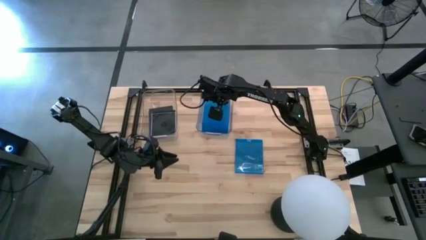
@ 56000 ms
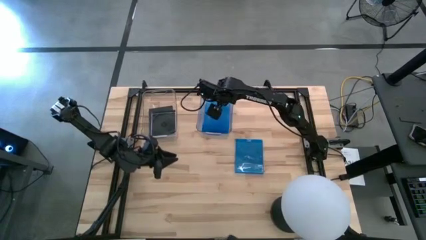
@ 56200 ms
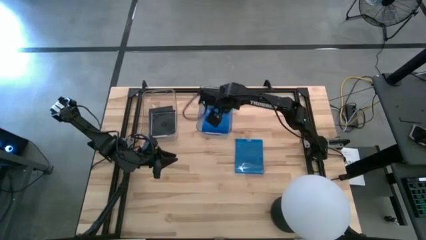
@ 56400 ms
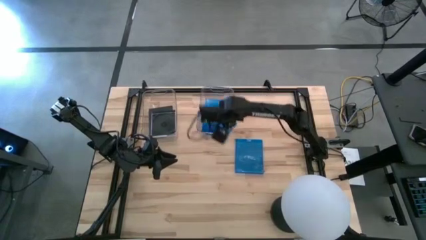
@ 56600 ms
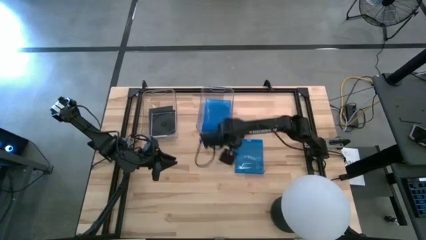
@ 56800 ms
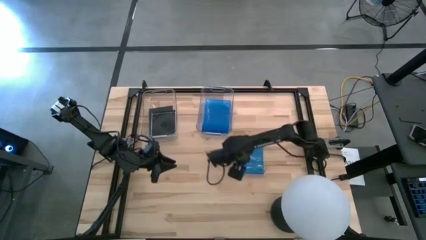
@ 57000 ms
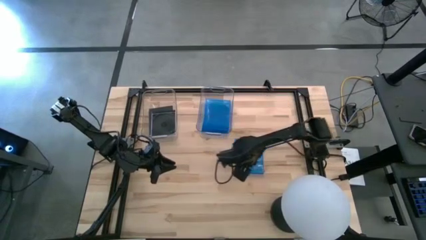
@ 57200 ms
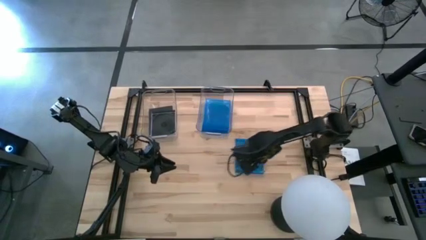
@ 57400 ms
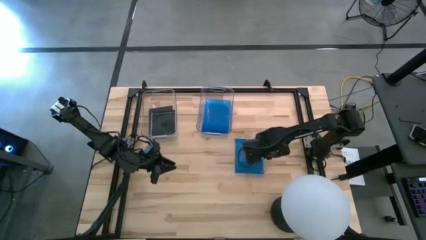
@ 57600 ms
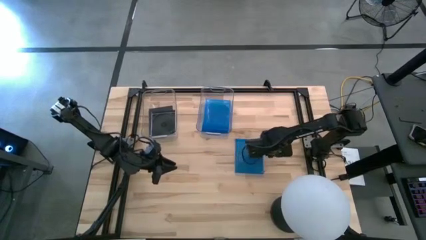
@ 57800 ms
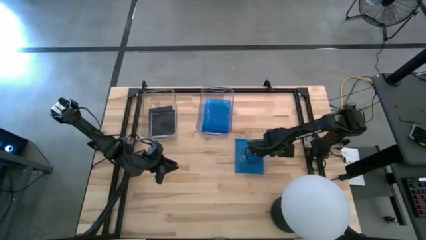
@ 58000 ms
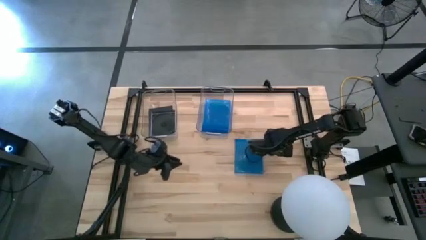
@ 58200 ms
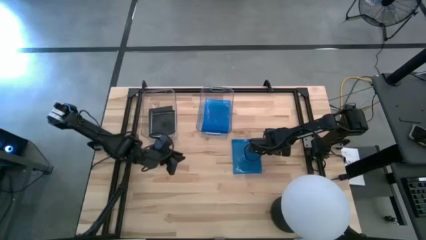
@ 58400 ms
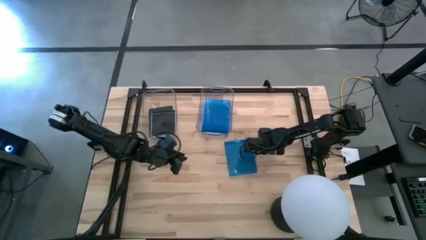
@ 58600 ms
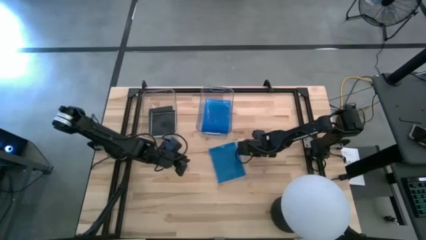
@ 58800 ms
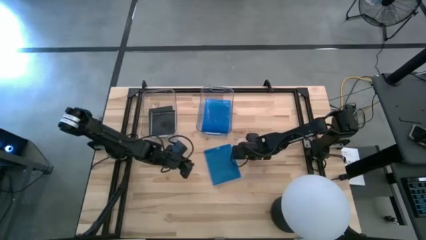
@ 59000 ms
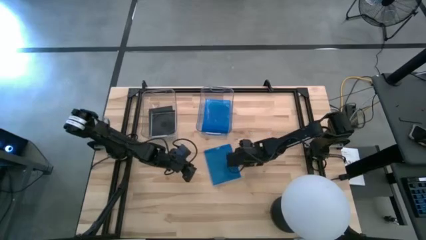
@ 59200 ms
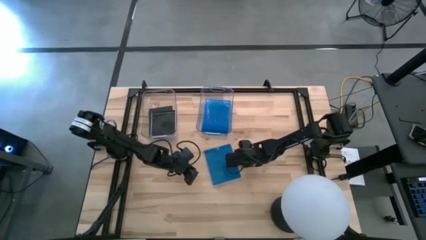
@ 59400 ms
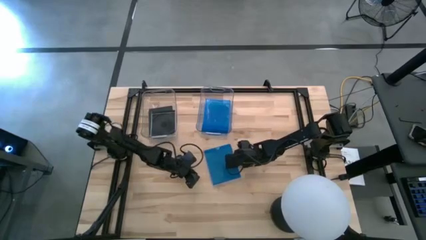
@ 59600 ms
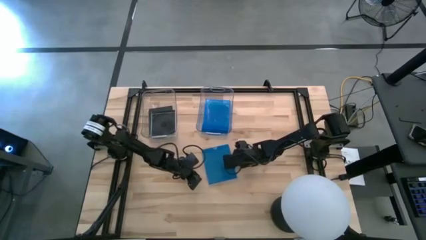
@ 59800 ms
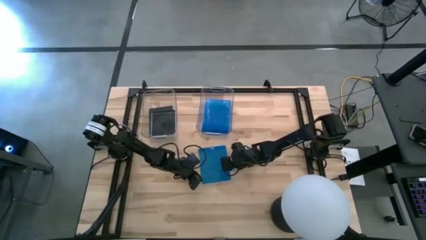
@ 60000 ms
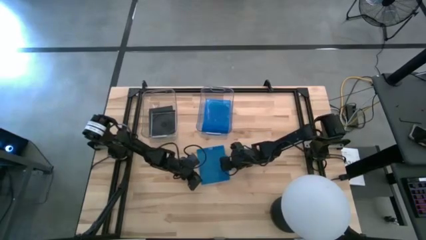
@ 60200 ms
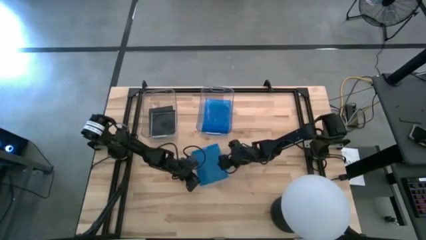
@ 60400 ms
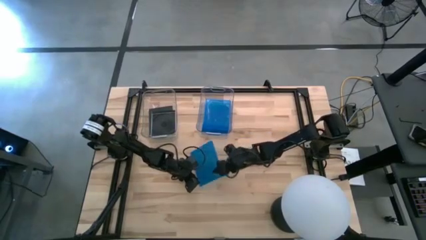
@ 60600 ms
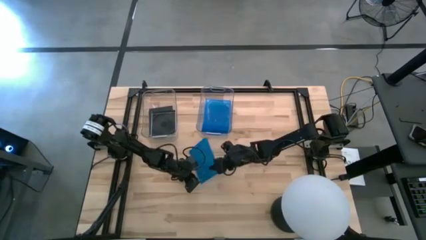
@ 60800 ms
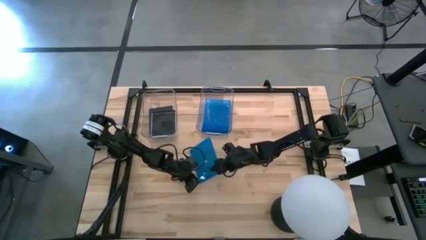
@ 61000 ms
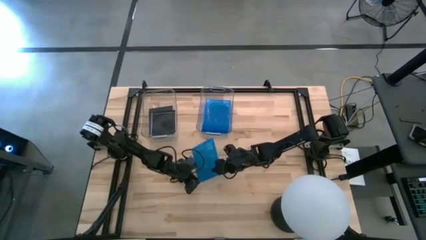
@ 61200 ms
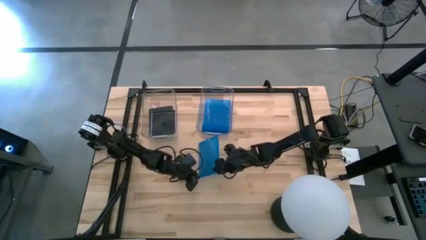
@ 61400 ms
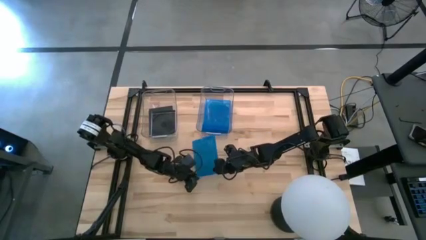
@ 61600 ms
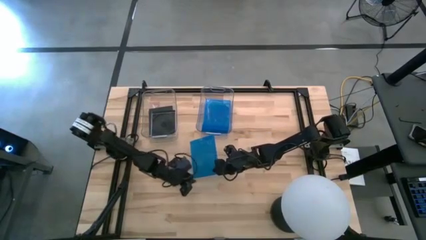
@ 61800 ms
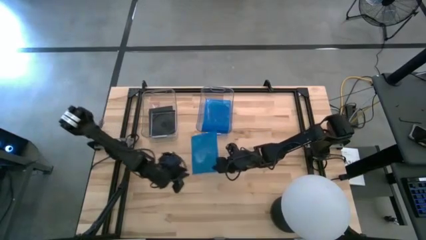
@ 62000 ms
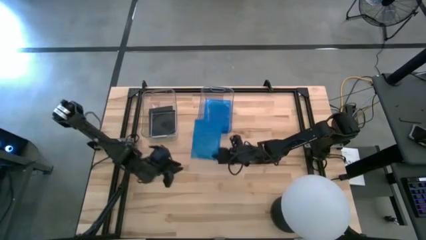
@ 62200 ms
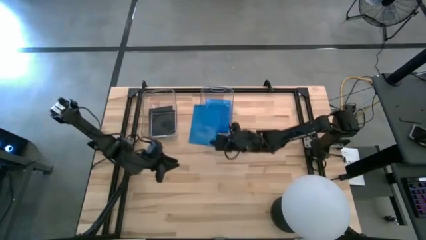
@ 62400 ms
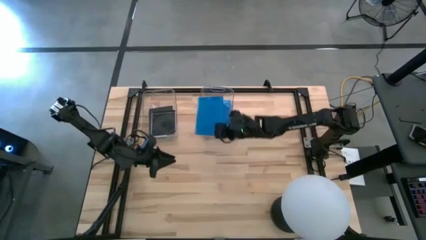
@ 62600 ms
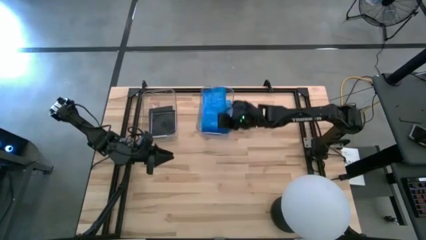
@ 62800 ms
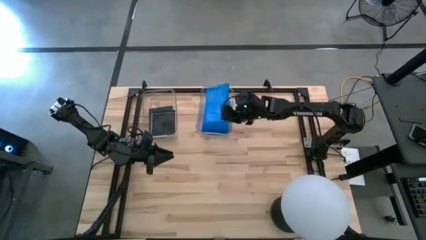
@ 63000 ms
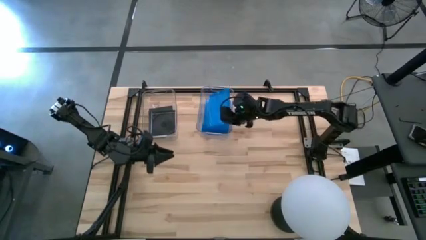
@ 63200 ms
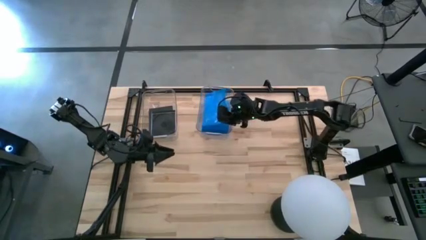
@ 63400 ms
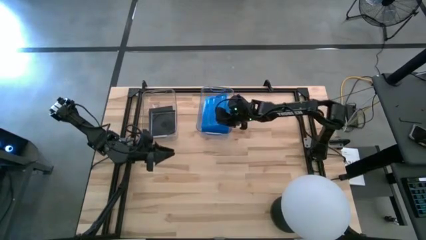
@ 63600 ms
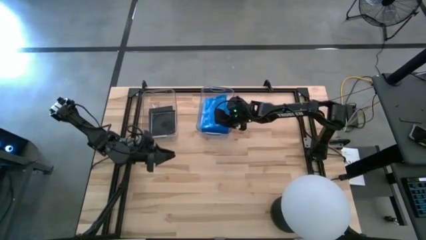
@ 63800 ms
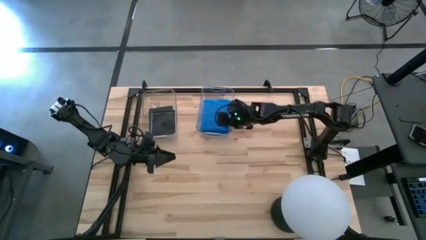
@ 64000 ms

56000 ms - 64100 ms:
Task: Pick & place jewel cases by type
Put the blue CD case into the right transparent bin

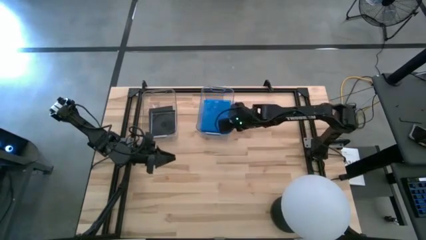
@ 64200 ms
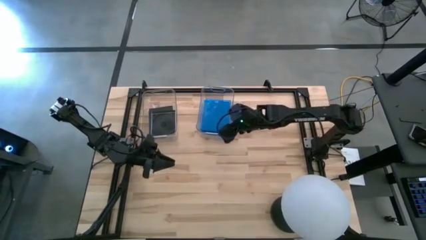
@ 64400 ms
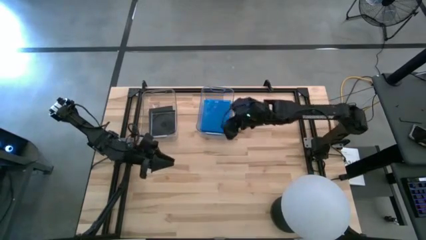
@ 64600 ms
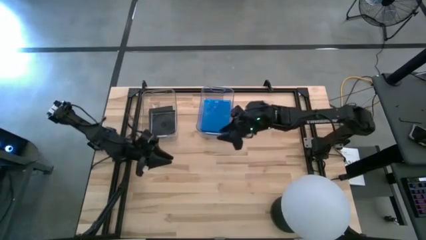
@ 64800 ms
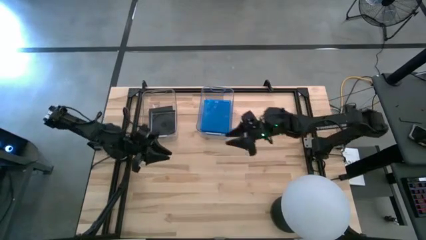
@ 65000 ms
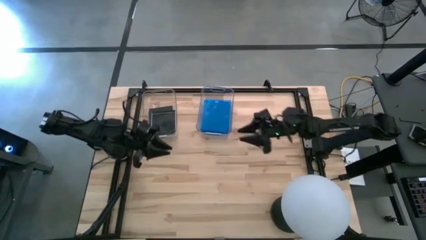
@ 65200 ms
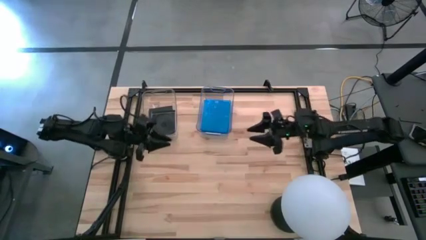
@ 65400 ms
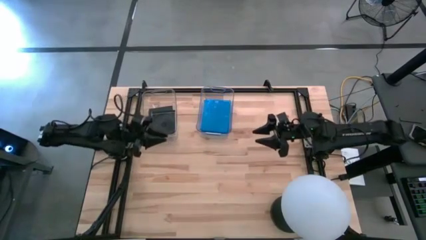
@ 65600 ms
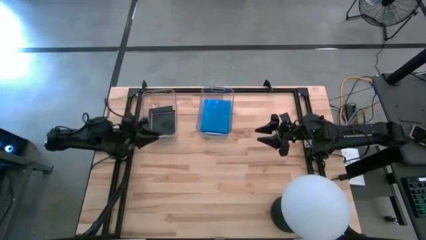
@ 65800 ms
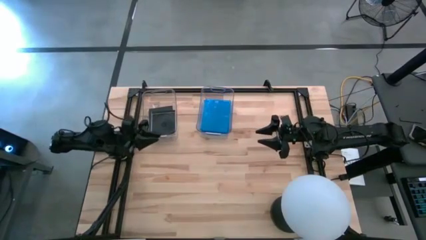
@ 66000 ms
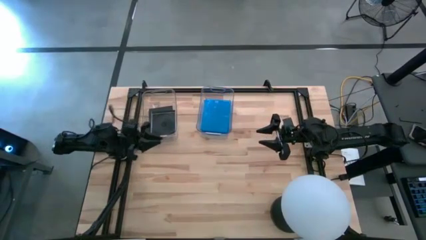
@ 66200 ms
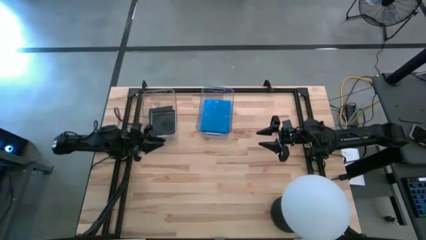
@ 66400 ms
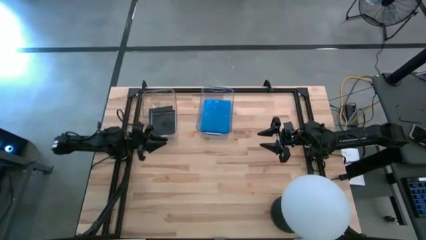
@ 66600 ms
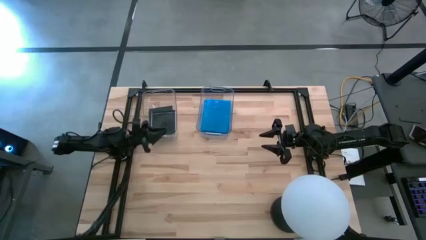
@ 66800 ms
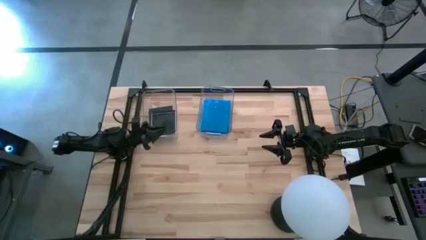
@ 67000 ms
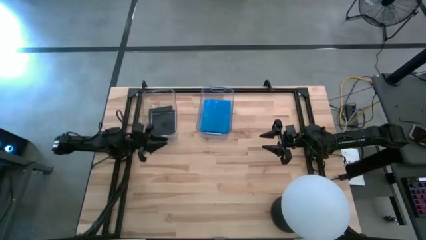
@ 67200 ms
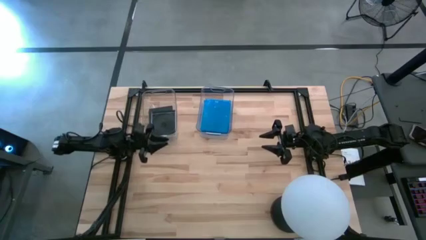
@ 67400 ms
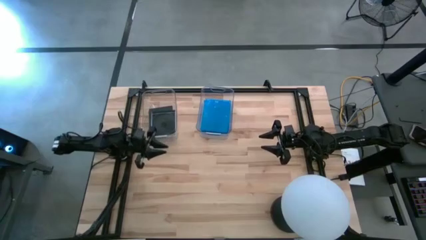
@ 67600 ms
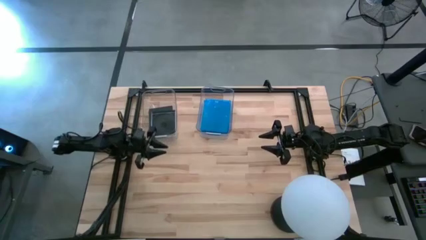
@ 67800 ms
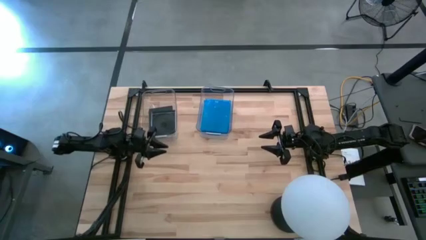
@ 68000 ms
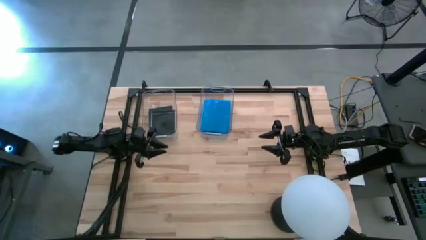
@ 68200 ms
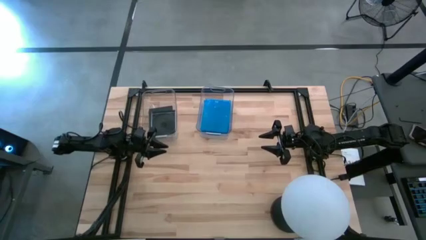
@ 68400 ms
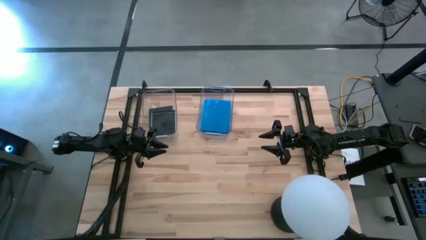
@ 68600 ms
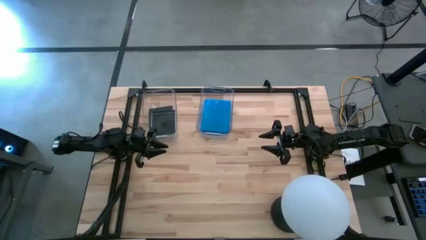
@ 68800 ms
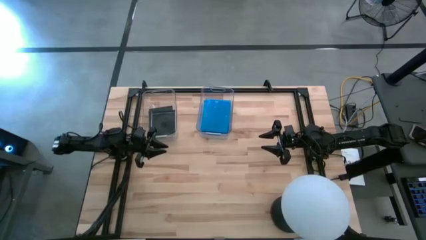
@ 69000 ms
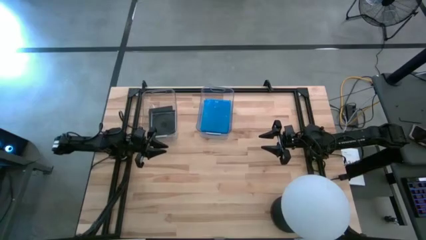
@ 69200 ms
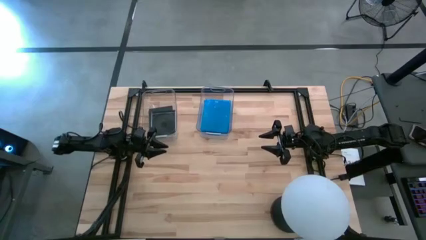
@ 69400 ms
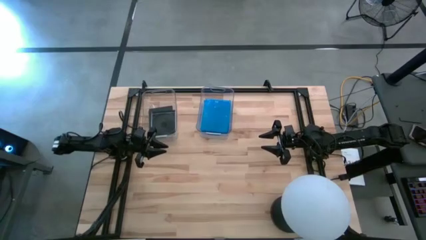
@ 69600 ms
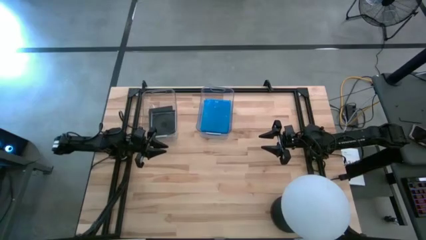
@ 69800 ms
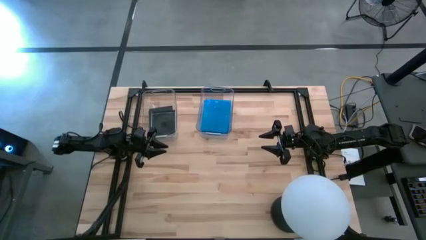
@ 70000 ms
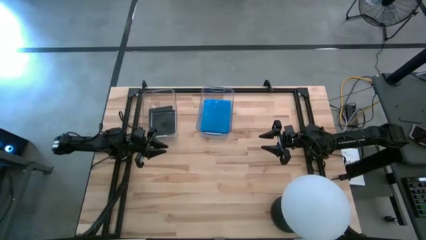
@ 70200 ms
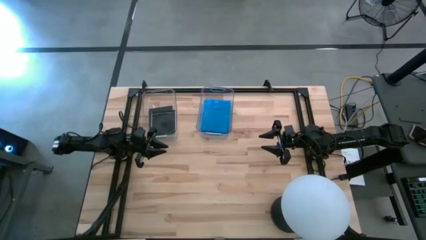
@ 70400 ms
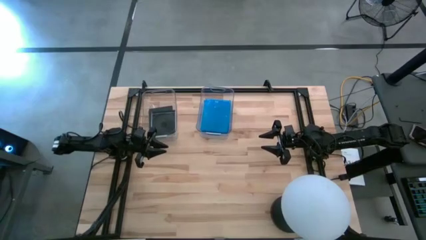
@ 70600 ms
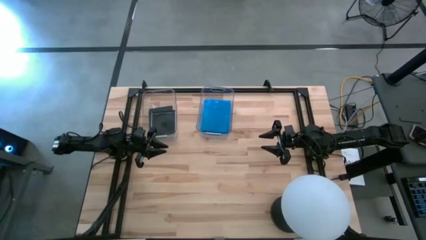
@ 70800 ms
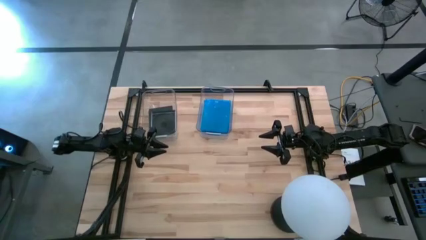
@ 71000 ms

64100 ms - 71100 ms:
Return to Home Position

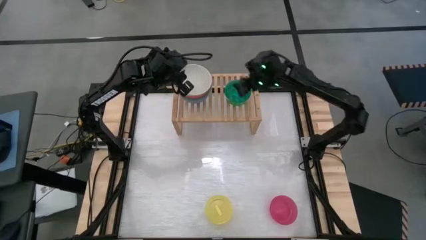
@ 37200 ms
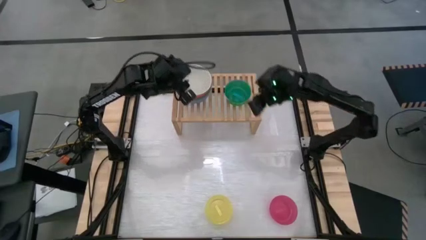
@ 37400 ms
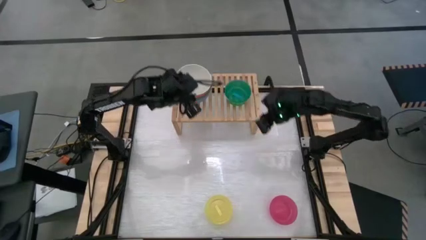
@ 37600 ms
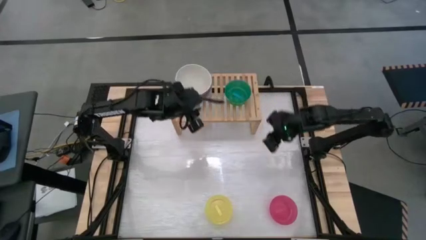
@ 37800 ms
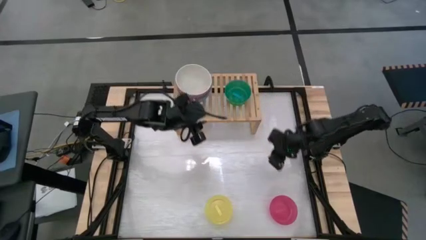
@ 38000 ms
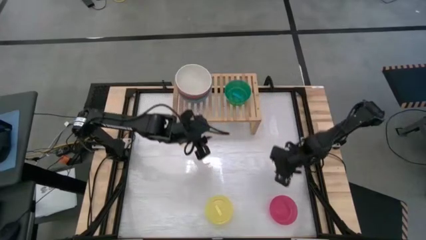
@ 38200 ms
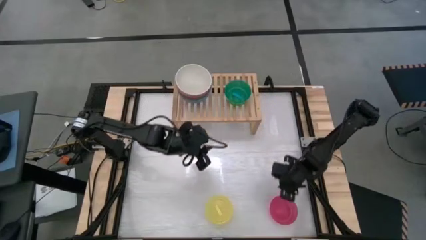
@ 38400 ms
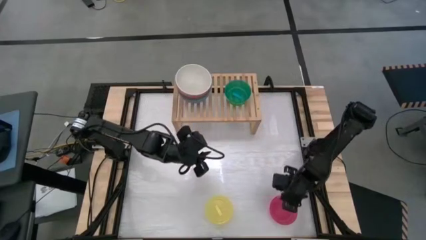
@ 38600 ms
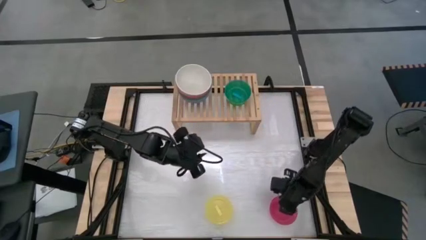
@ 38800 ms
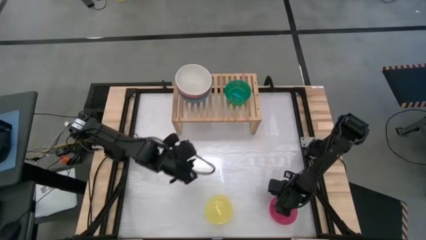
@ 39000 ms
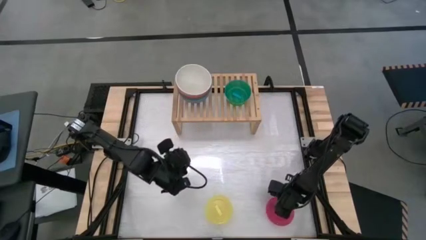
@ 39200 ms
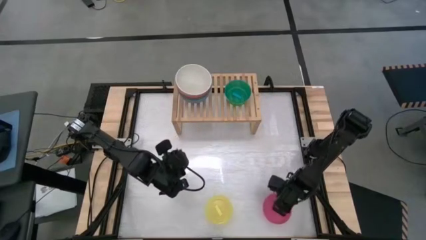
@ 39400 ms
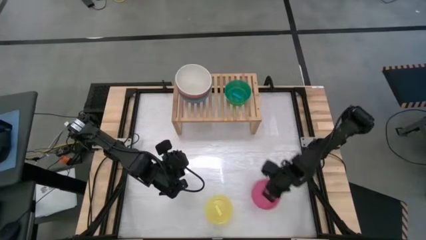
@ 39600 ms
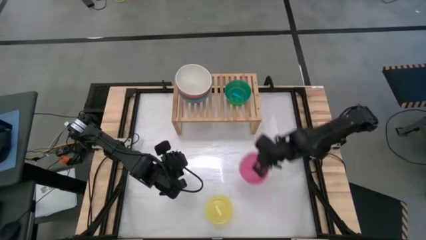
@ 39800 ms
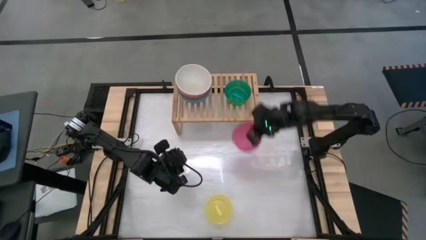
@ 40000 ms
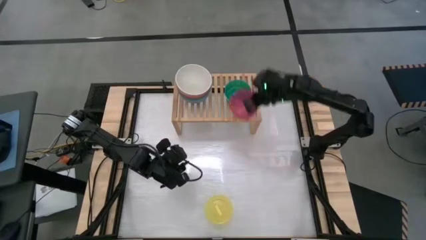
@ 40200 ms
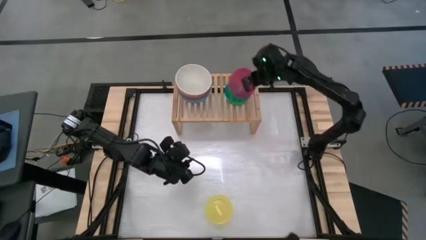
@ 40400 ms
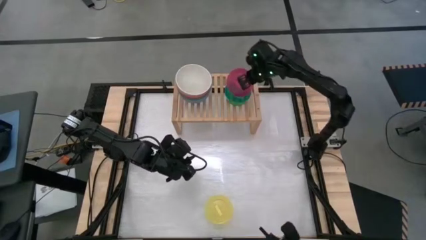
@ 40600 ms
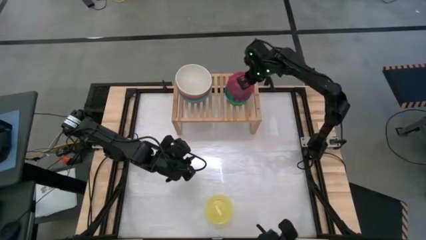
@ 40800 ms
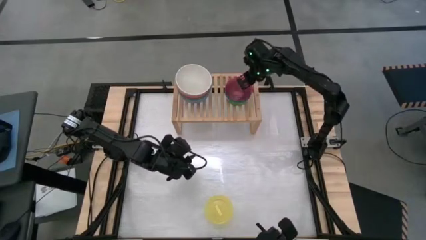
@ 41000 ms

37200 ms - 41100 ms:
Task: Place and stack bowls onto a shelf
Stack the red bowl on the blue bowl on the shelf
